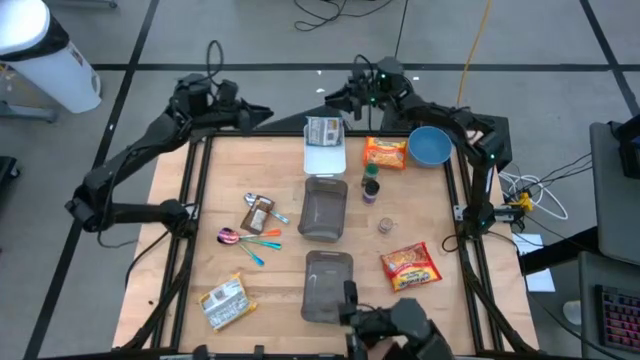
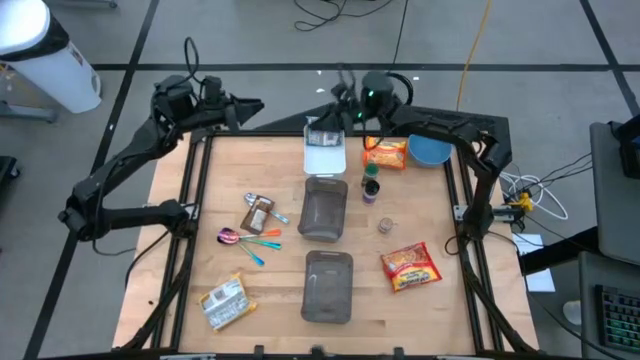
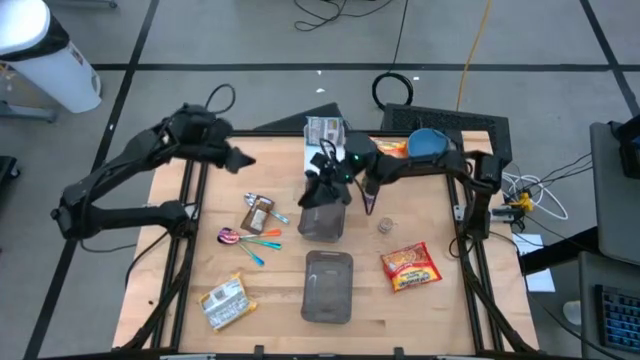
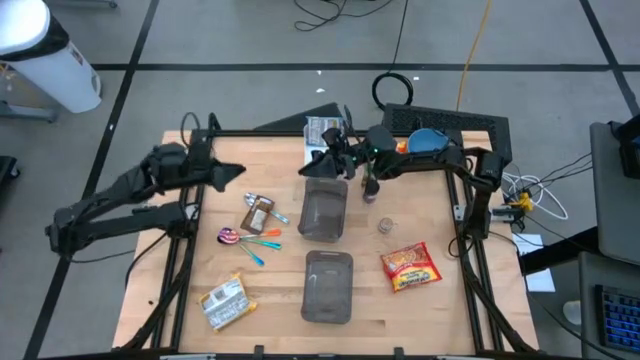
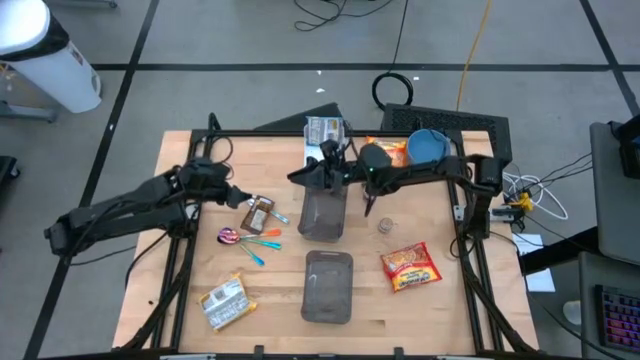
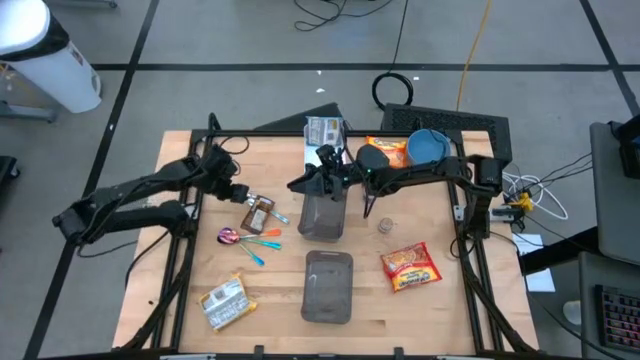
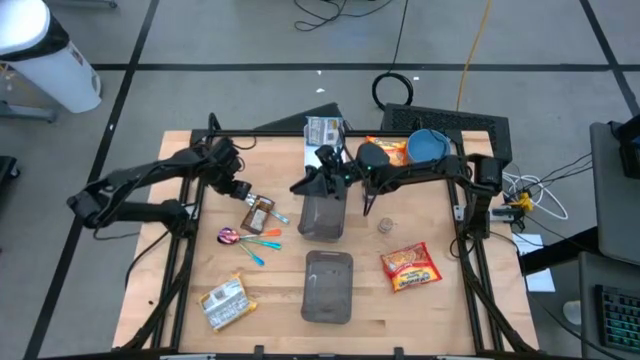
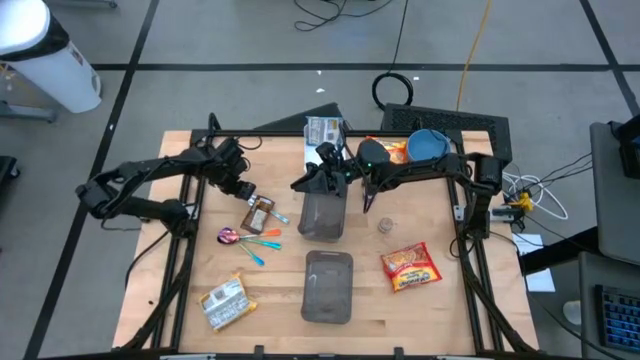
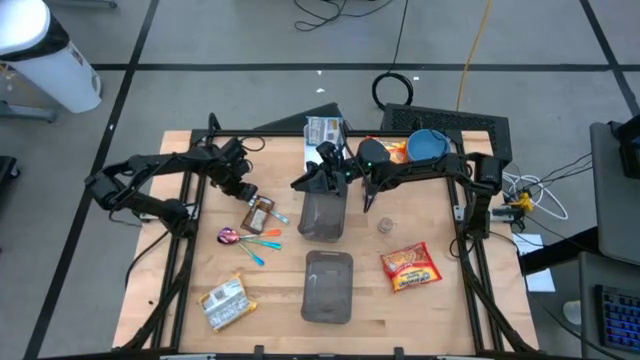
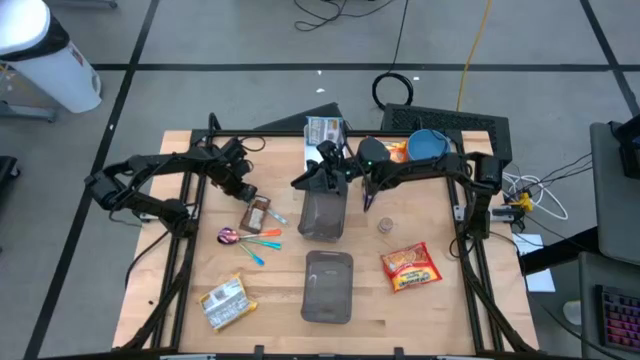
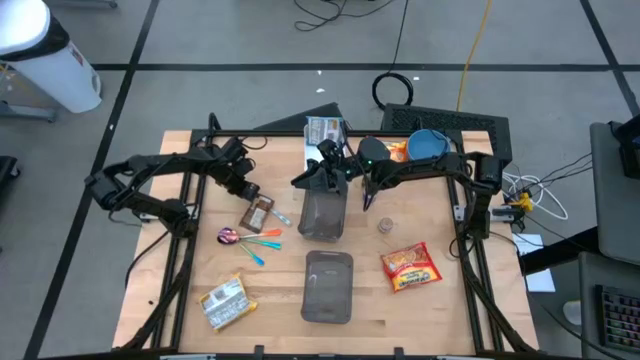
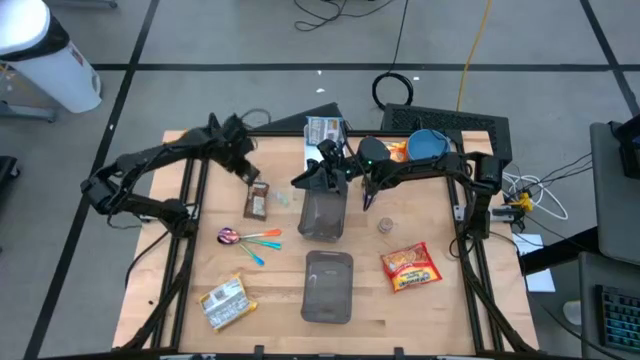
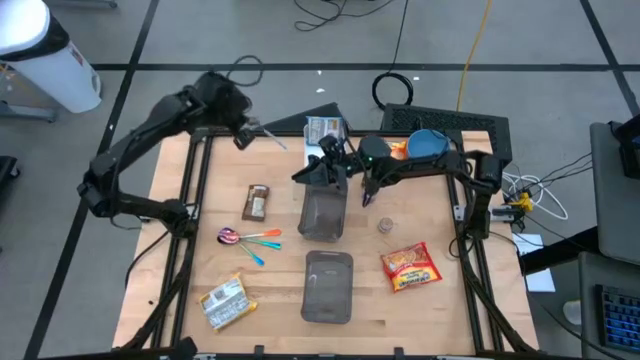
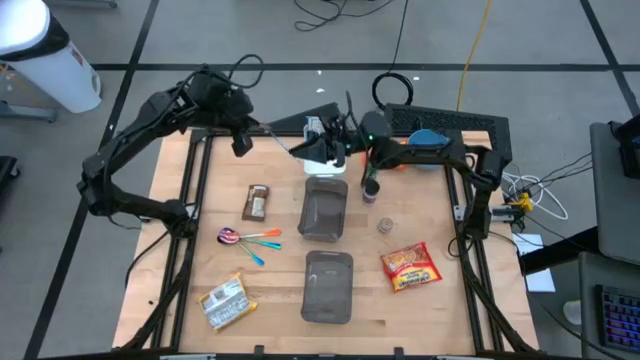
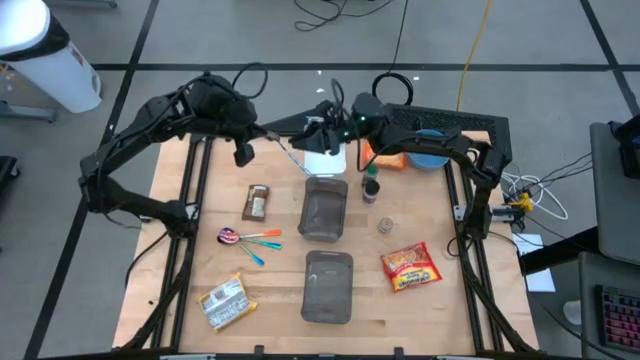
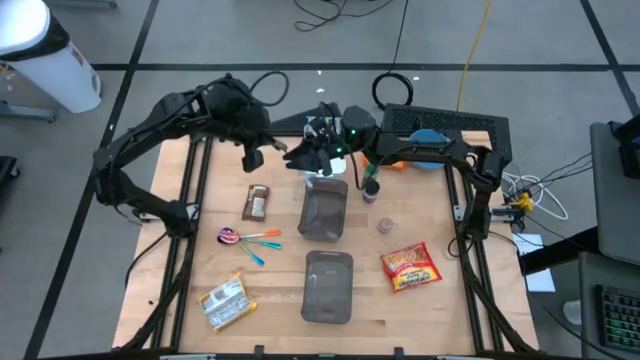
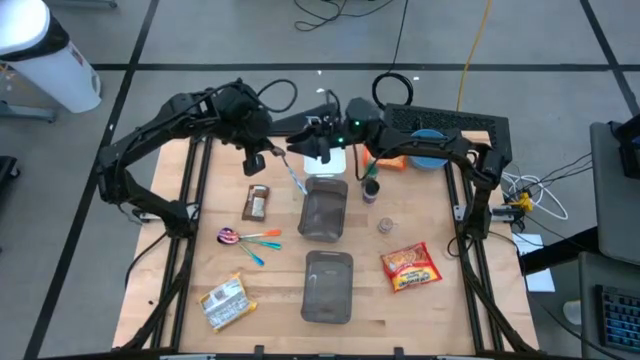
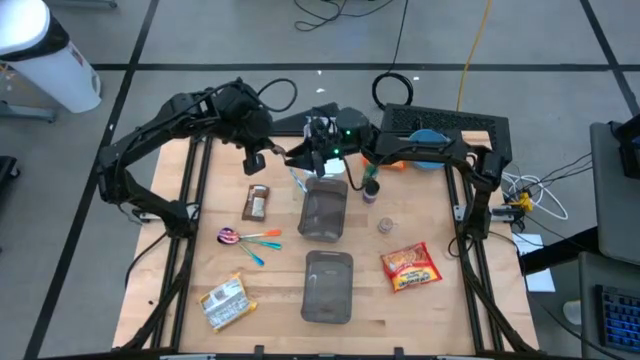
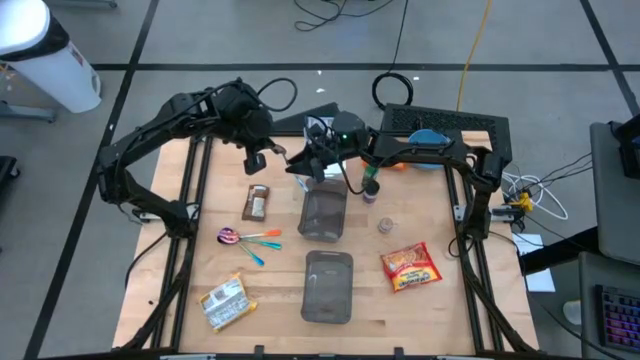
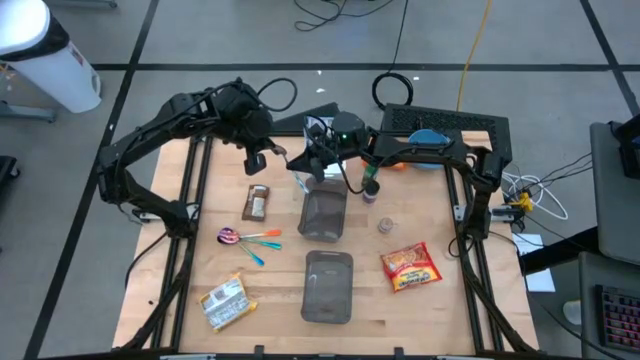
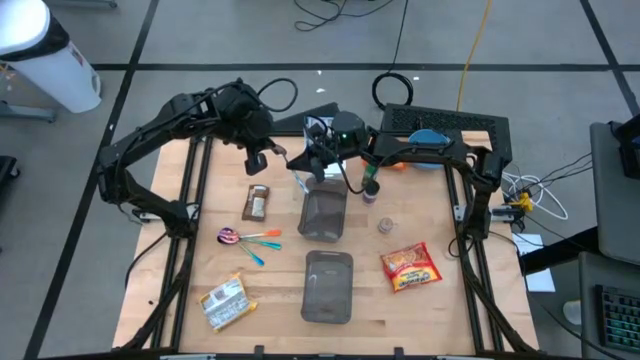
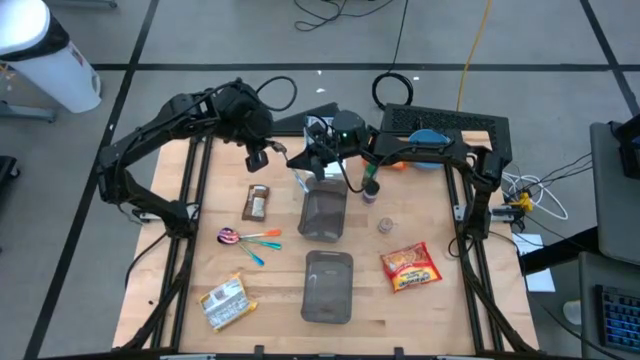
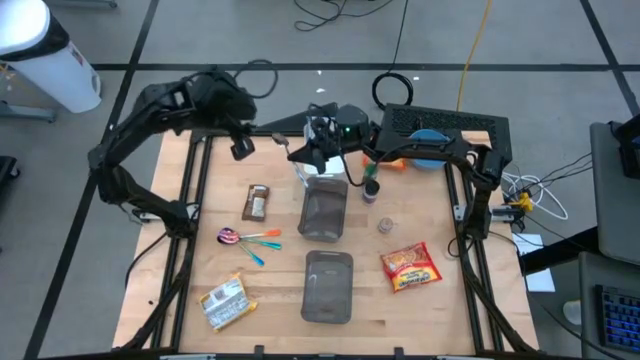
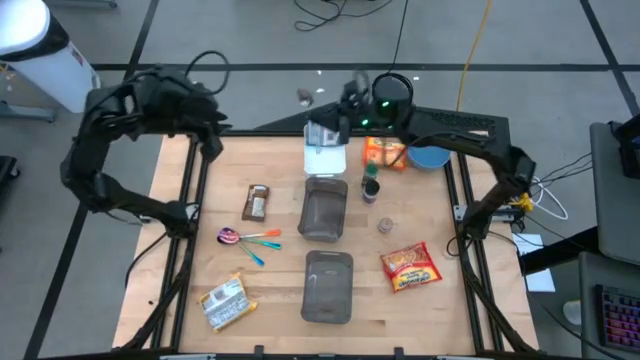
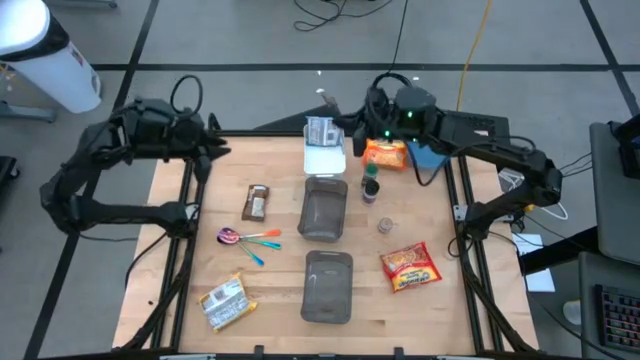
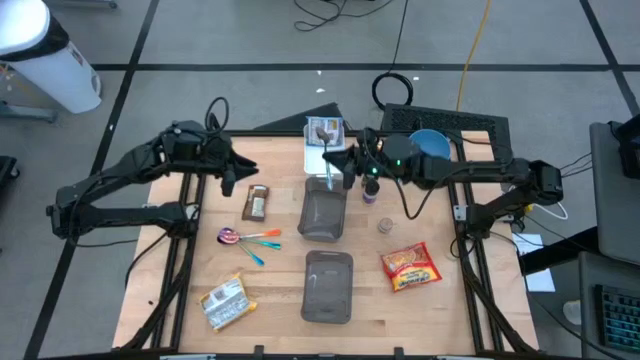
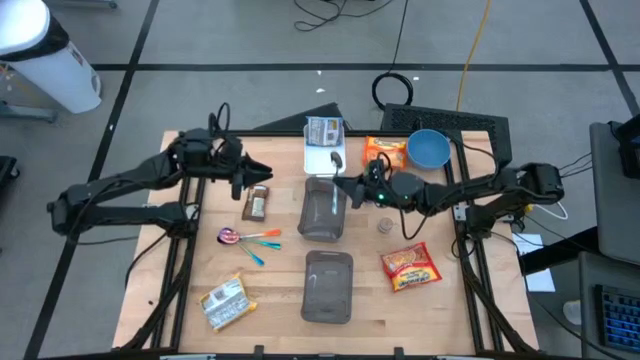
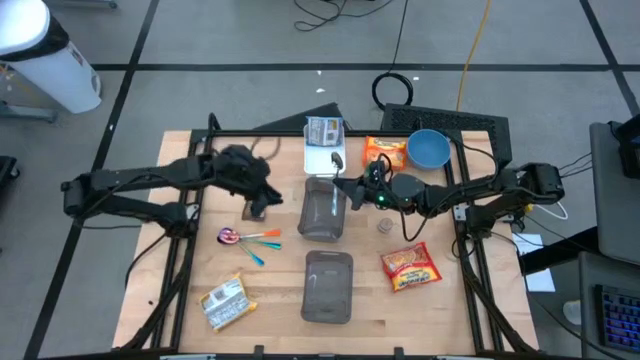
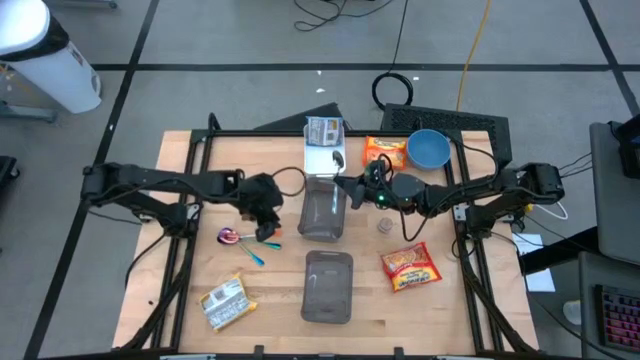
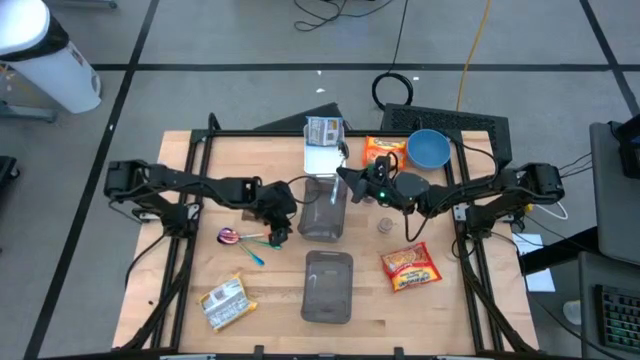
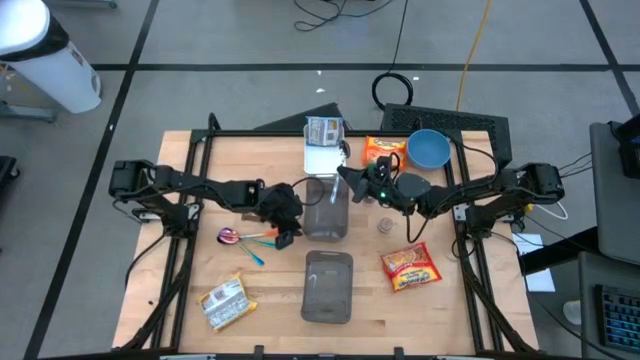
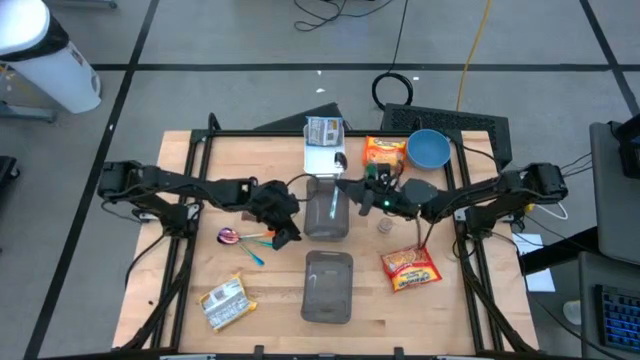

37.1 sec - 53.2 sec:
Task: Pick & Place Food Item
Put the blue patterned spoon into the bottom black bin

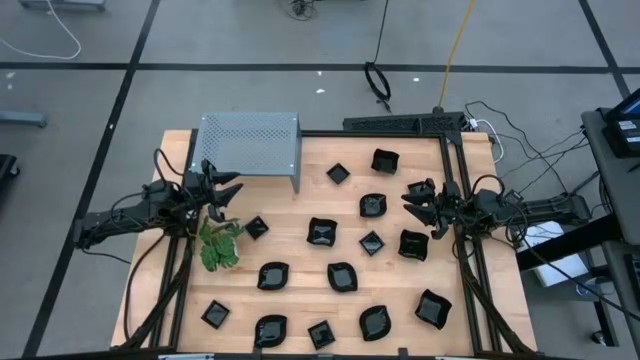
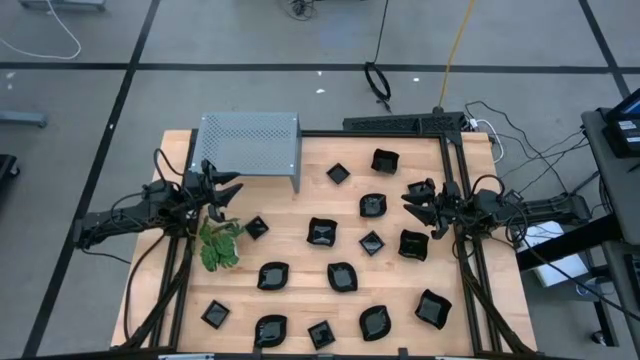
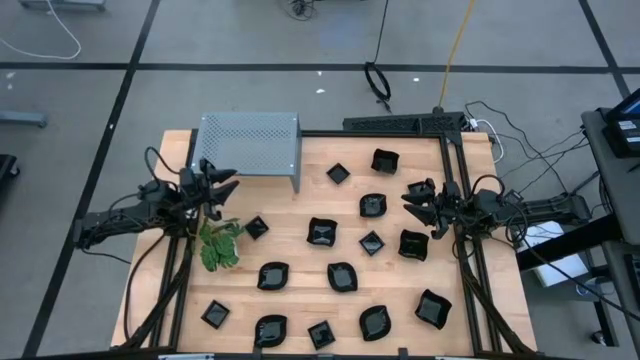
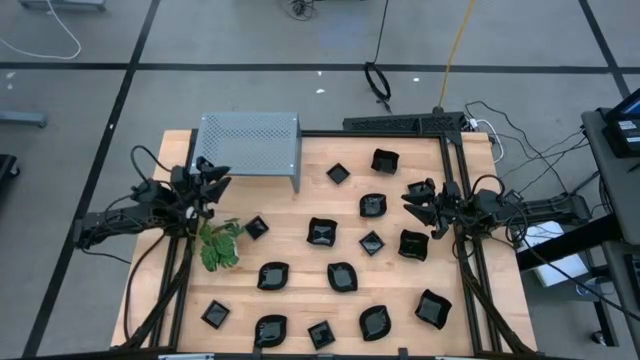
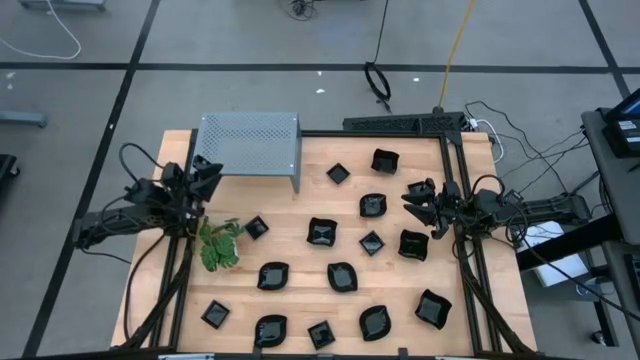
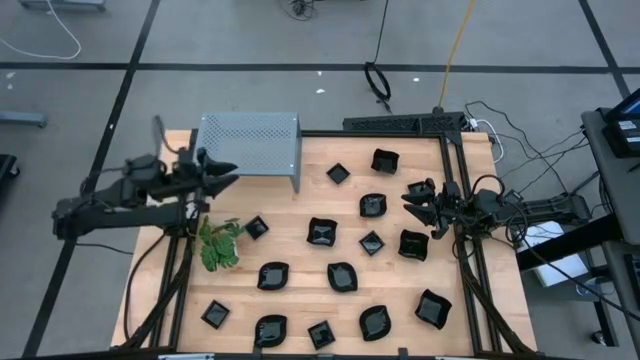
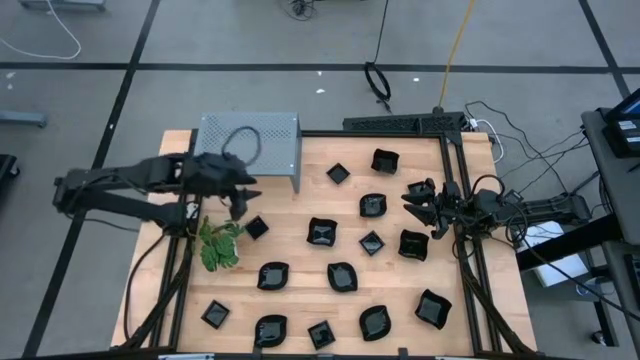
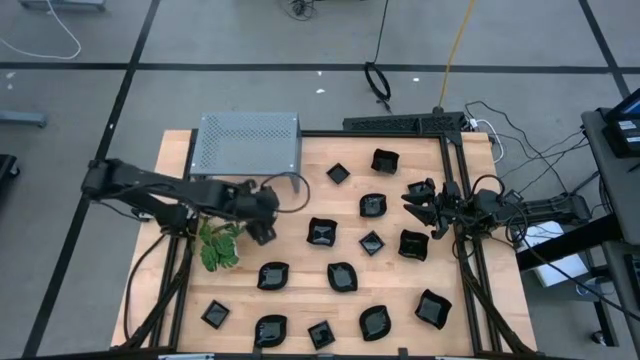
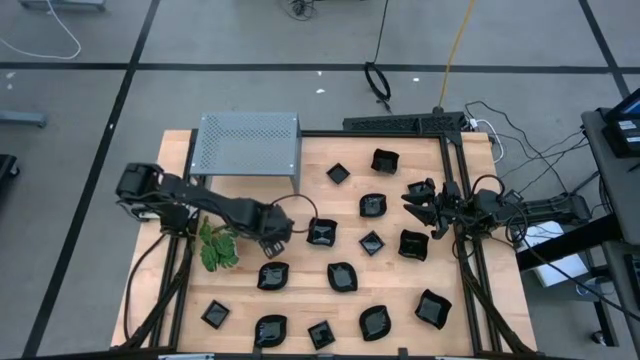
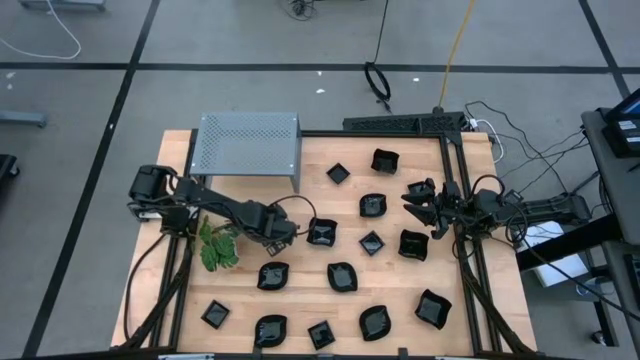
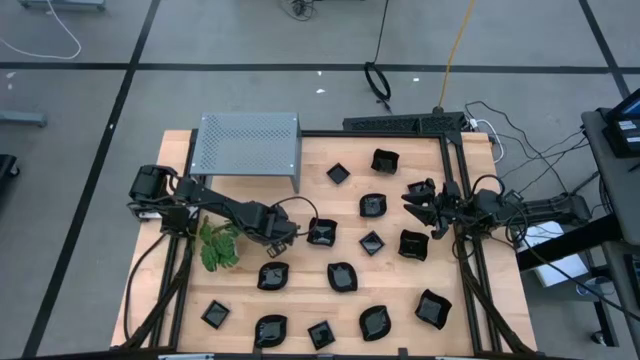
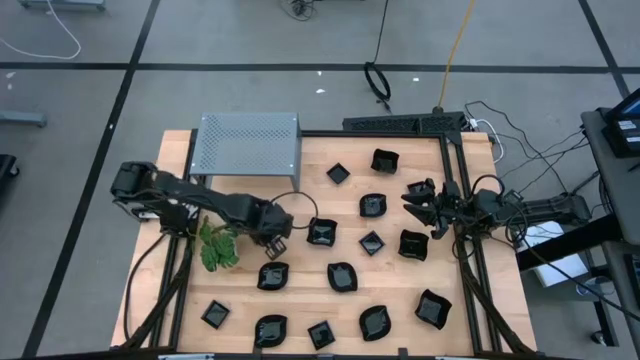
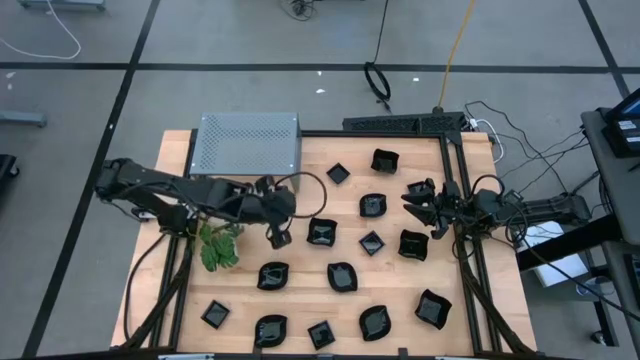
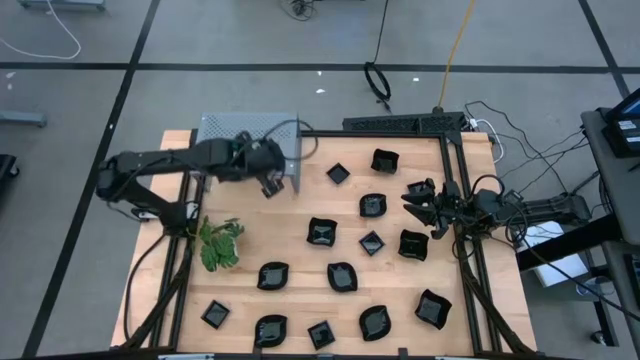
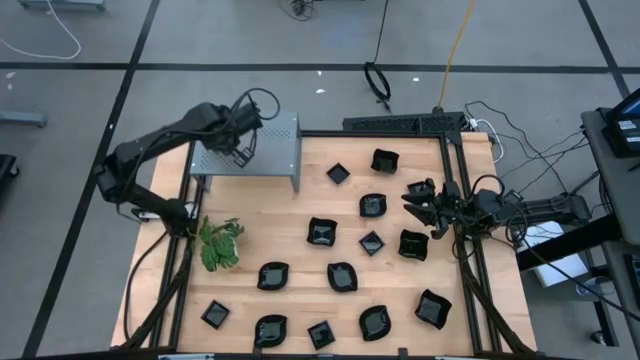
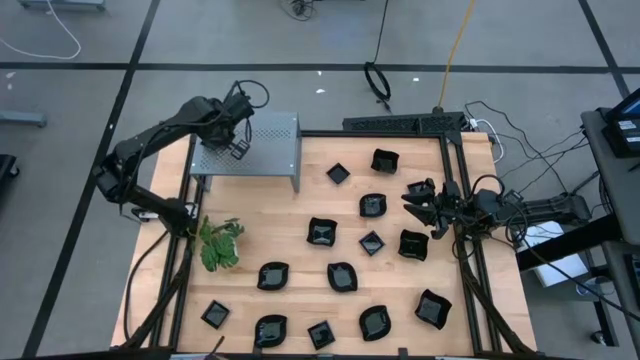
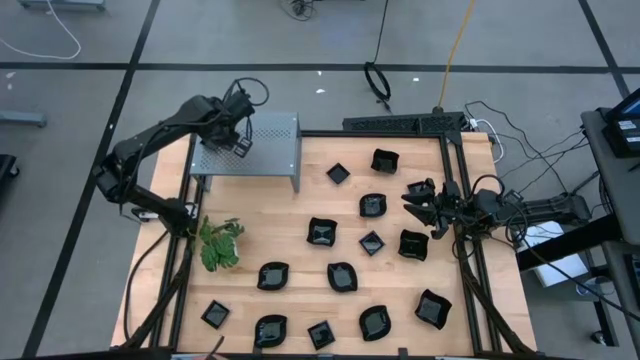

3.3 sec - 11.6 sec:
Task: Pick & Place Mini shaped plates
Put the square plate on the shelf
